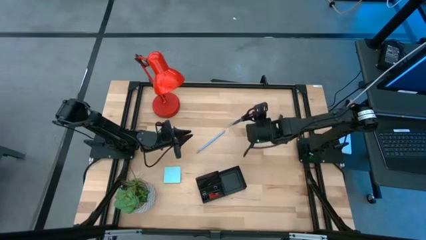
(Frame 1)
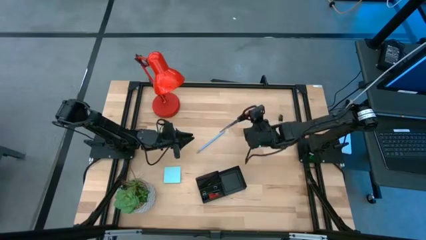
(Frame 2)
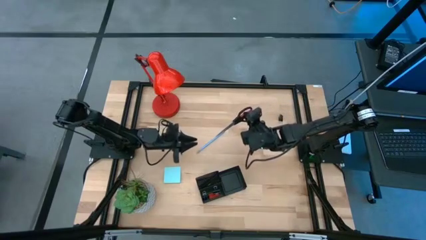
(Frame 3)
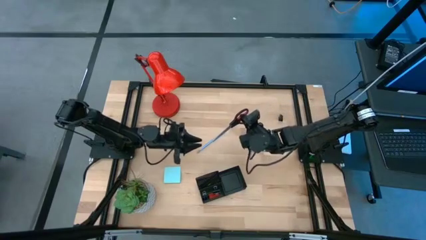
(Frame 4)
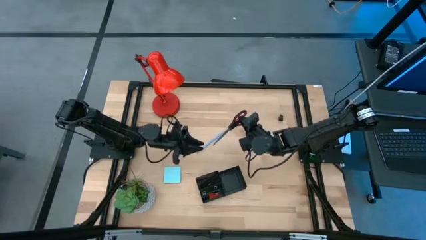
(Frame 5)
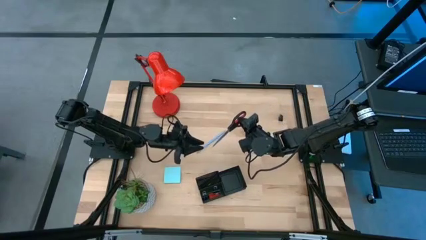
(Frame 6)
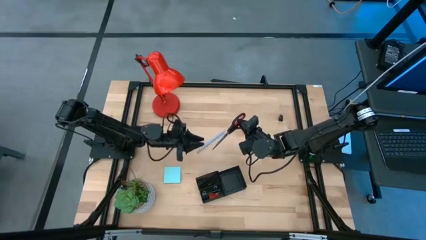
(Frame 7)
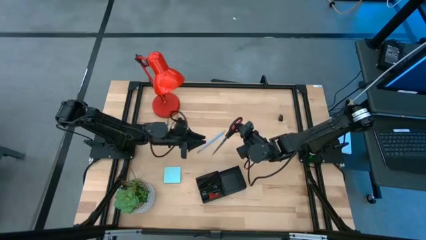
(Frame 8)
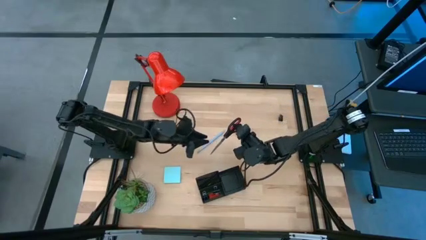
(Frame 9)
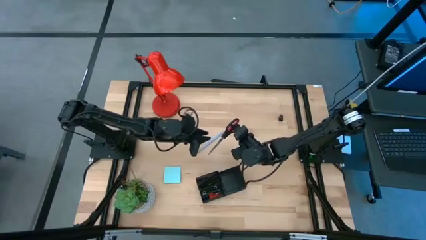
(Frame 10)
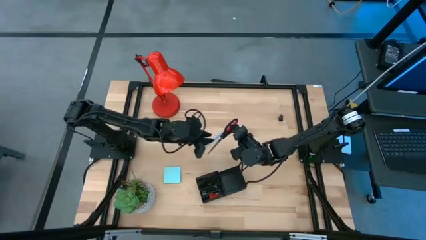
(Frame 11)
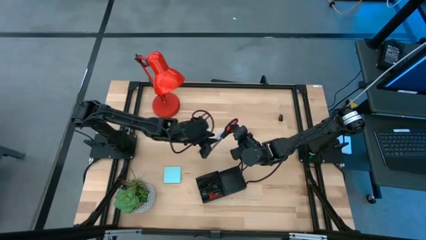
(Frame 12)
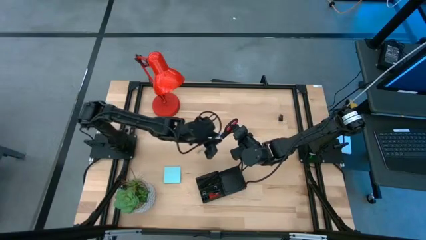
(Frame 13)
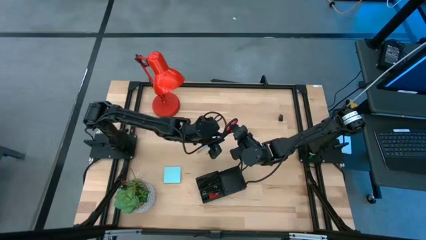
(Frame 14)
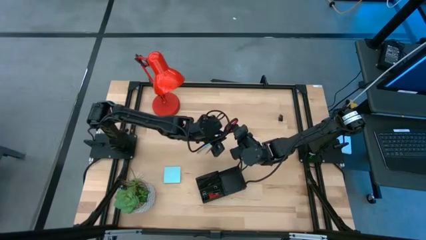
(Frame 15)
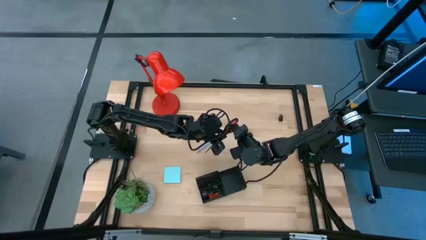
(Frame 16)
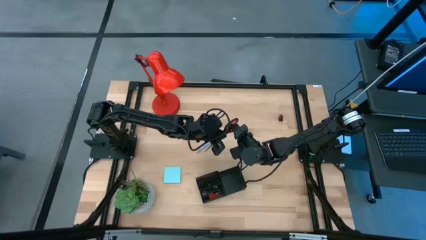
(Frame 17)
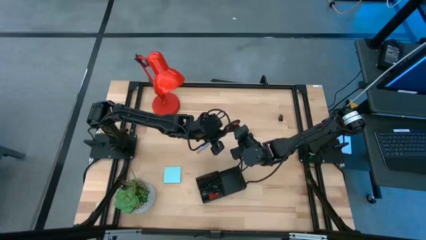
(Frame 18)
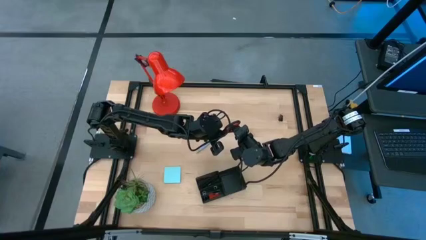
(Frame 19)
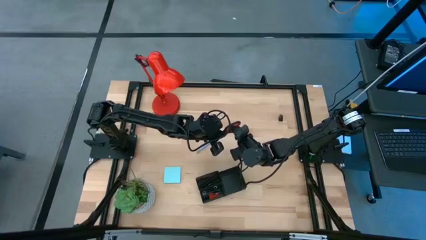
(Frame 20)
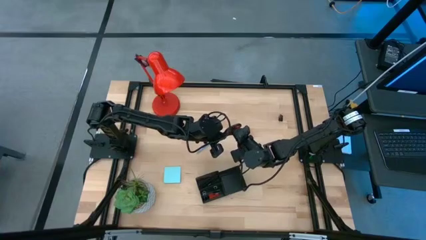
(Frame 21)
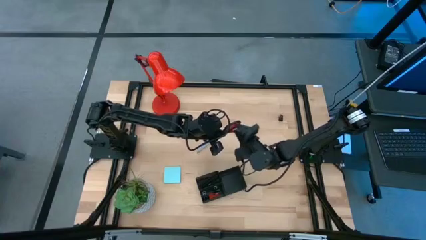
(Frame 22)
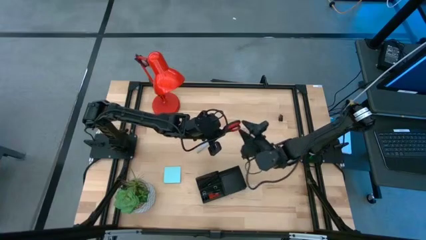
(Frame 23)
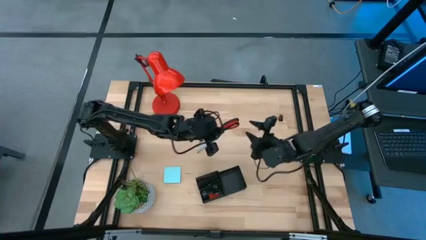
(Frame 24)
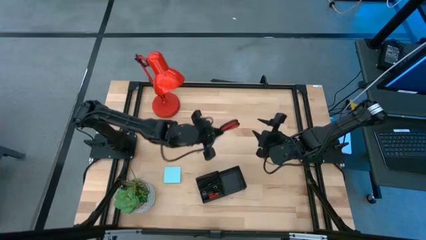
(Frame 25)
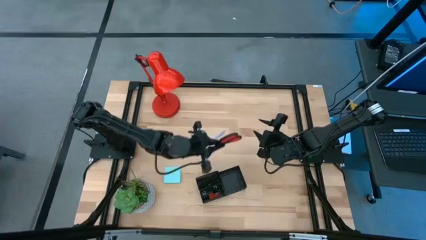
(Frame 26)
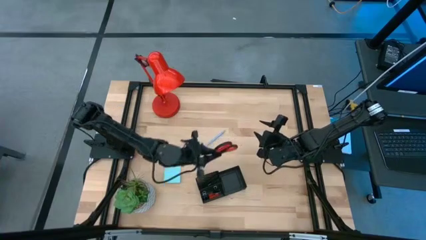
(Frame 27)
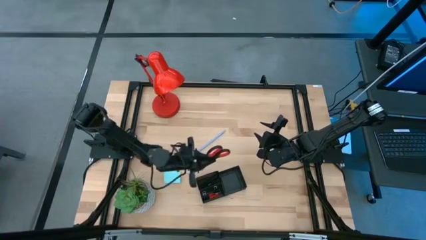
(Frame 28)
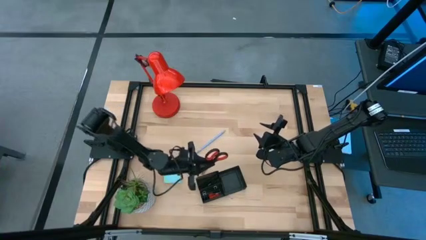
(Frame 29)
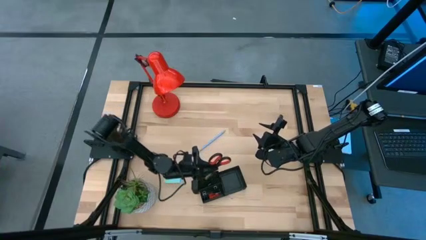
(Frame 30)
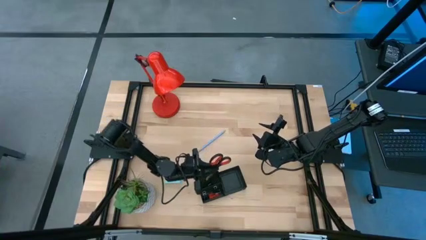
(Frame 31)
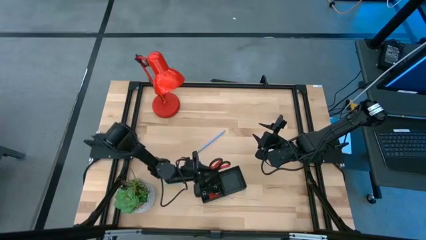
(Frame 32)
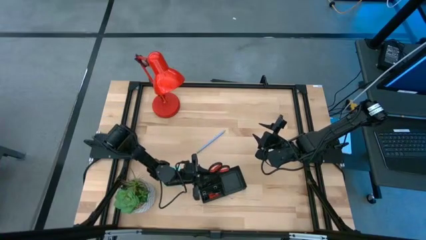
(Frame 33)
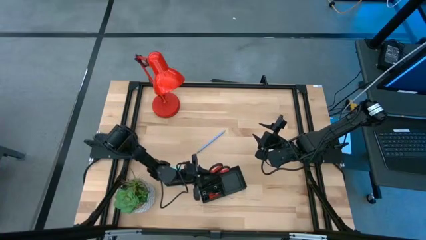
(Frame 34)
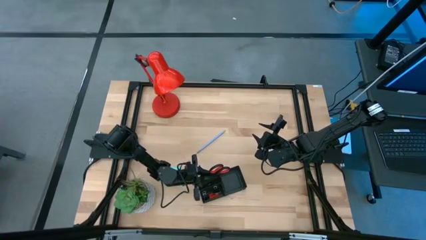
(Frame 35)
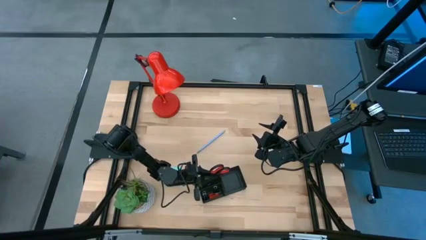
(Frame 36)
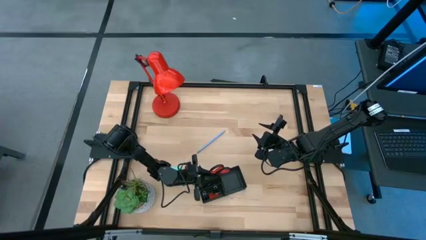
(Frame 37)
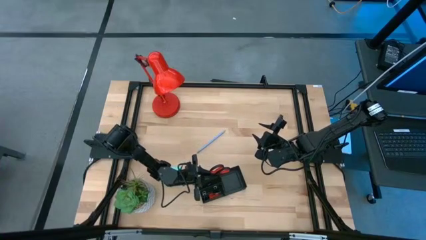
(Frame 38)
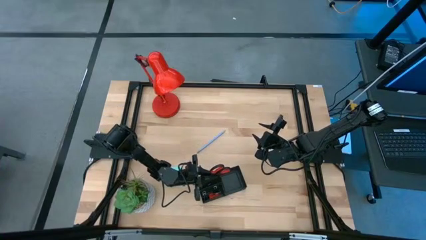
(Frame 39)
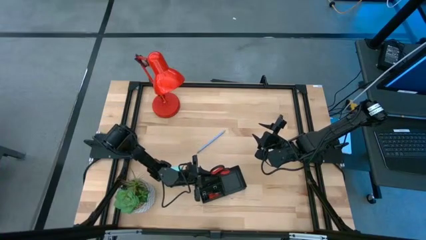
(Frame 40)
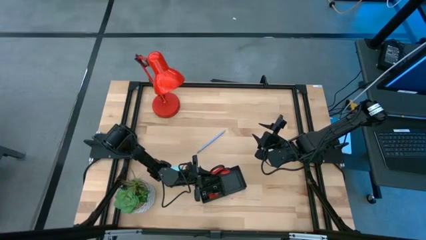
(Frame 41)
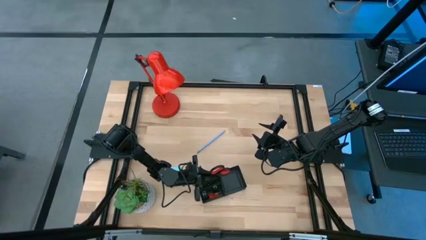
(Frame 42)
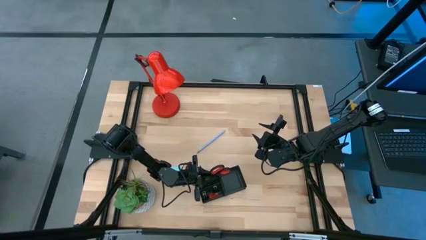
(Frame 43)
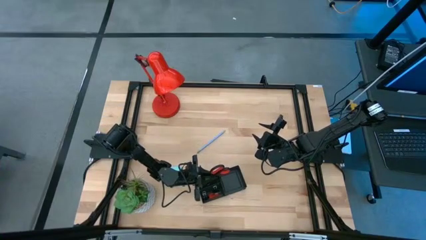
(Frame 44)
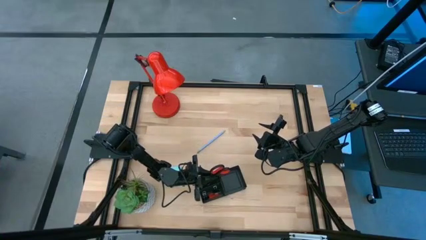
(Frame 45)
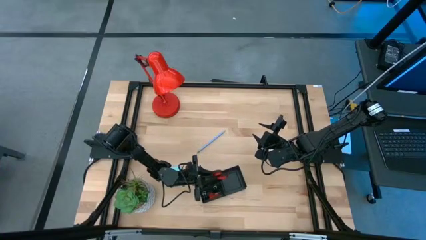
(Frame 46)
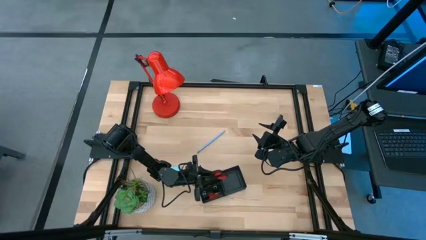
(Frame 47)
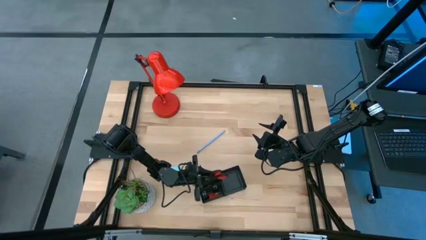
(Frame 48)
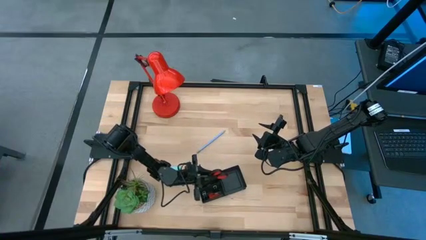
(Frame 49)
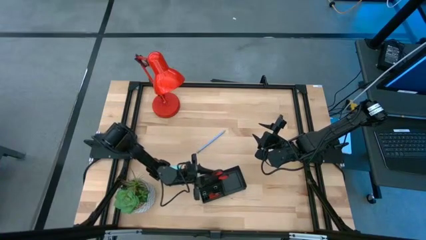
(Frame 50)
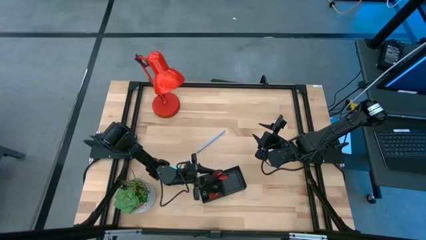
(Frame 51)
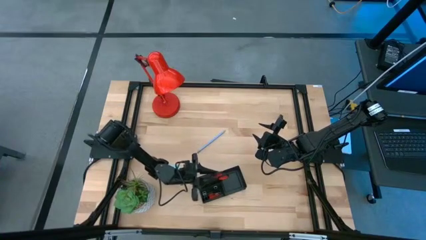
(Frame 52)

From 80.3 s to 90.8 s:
Task: Pick and place office supplies into organizer
Put the black scissors into the black desk organizer

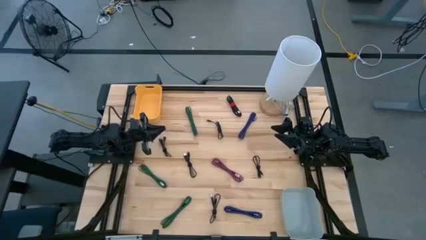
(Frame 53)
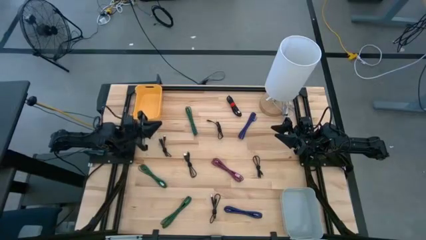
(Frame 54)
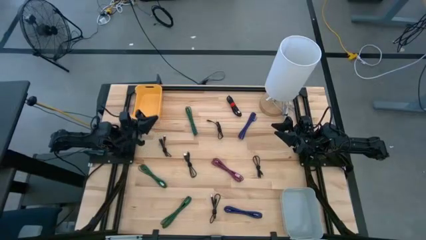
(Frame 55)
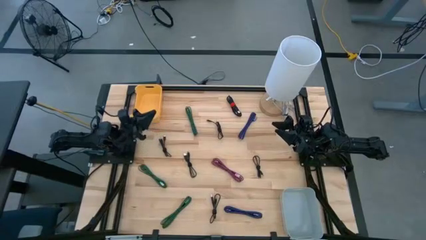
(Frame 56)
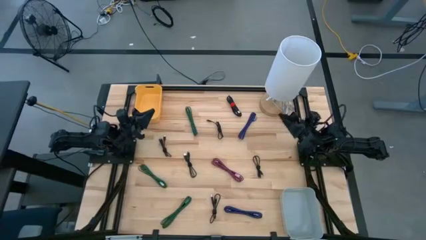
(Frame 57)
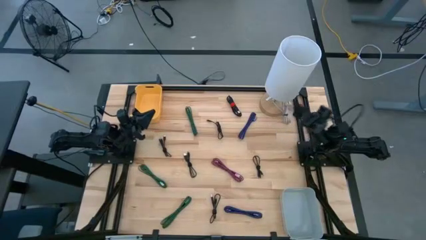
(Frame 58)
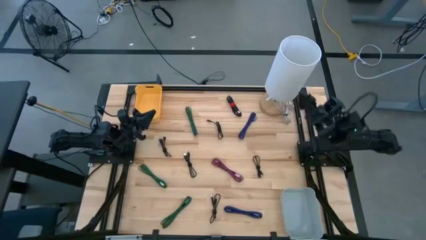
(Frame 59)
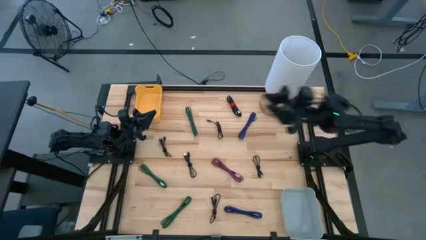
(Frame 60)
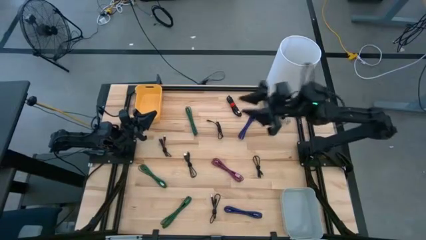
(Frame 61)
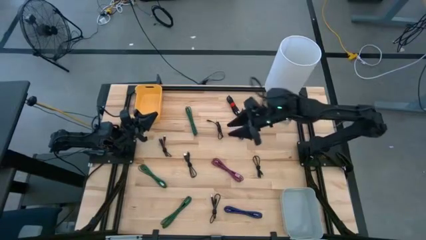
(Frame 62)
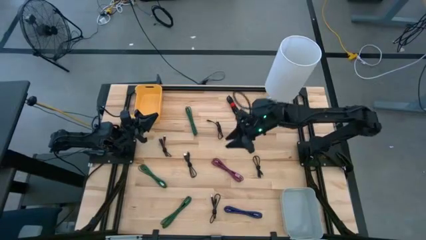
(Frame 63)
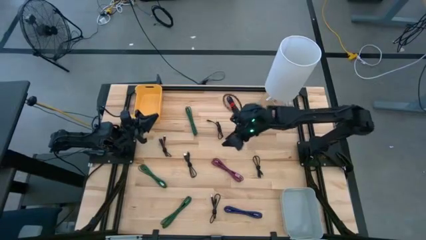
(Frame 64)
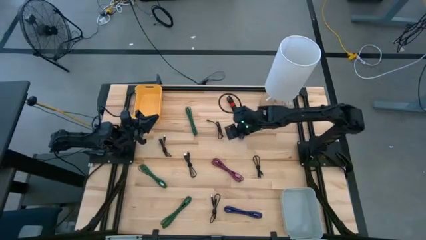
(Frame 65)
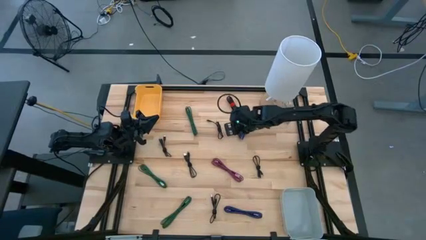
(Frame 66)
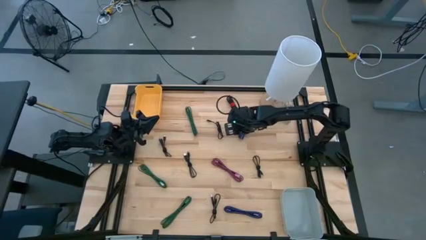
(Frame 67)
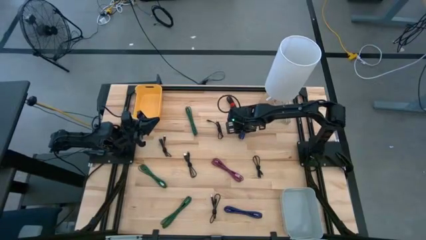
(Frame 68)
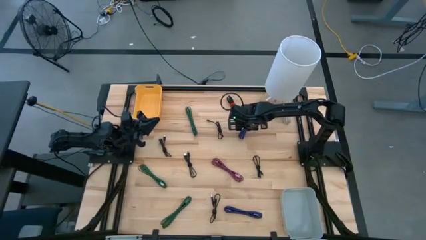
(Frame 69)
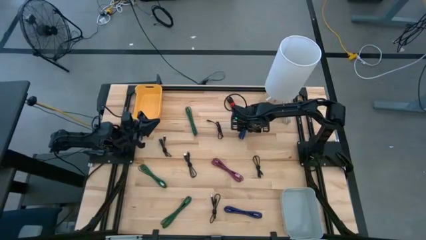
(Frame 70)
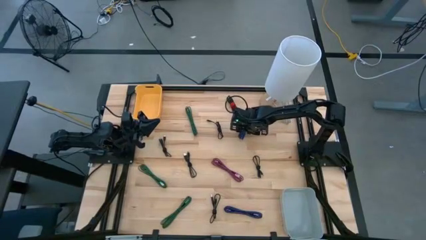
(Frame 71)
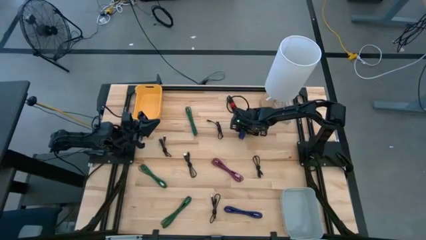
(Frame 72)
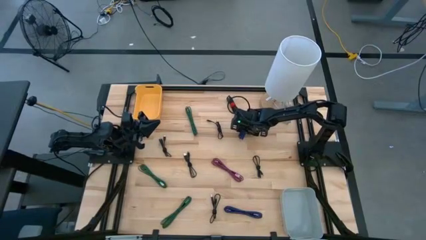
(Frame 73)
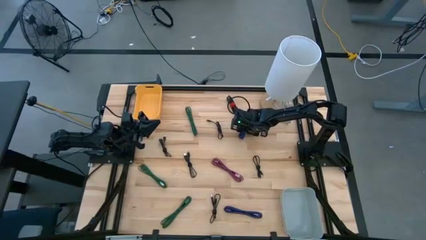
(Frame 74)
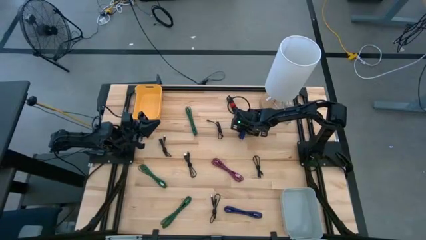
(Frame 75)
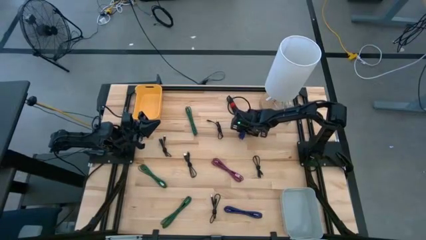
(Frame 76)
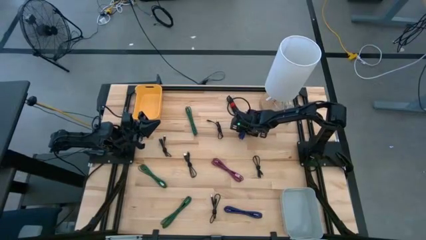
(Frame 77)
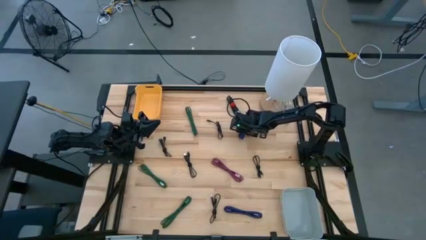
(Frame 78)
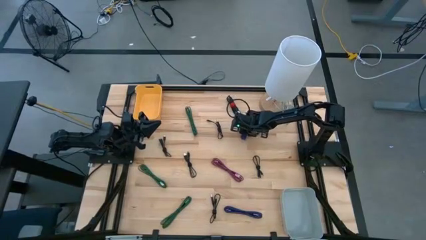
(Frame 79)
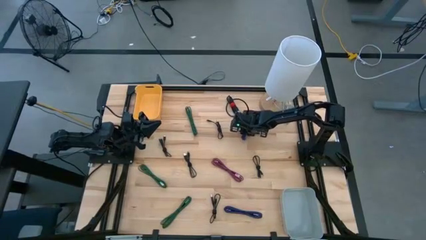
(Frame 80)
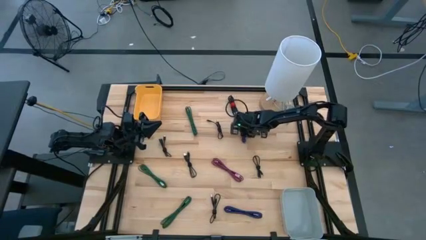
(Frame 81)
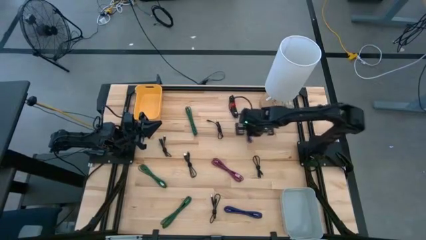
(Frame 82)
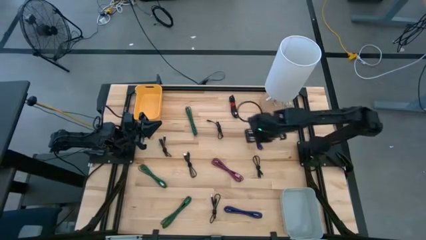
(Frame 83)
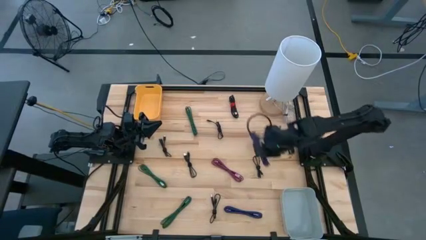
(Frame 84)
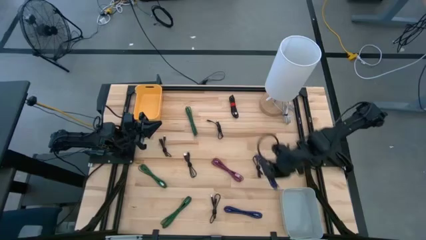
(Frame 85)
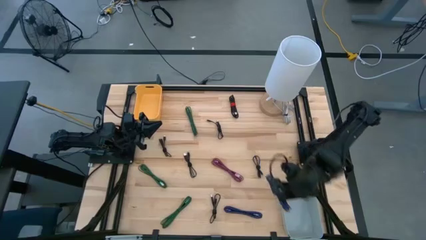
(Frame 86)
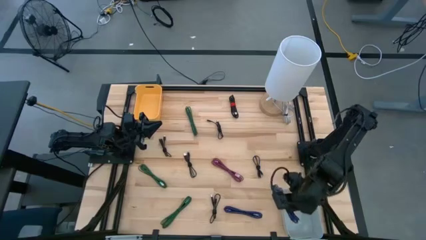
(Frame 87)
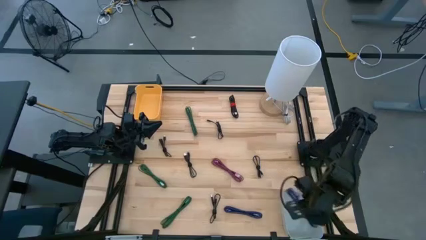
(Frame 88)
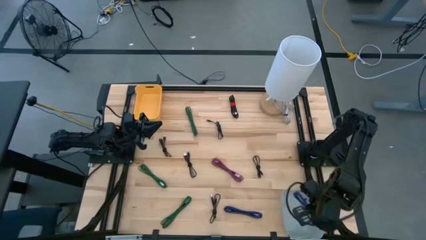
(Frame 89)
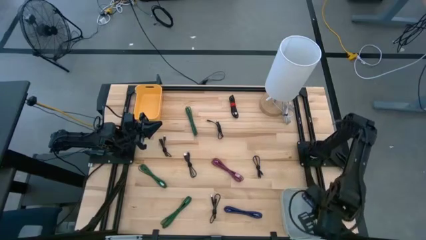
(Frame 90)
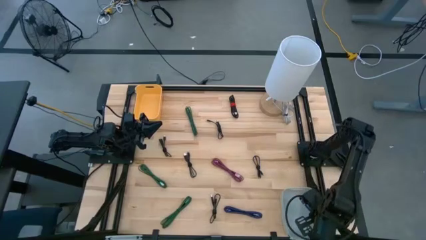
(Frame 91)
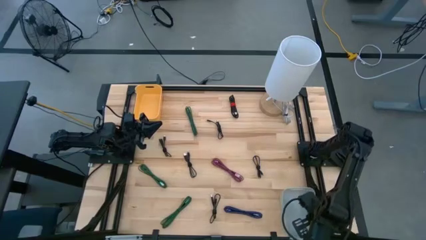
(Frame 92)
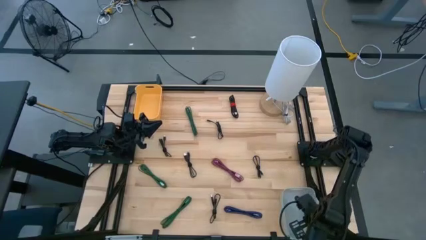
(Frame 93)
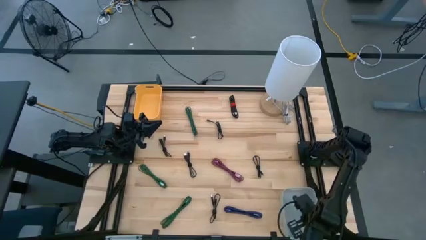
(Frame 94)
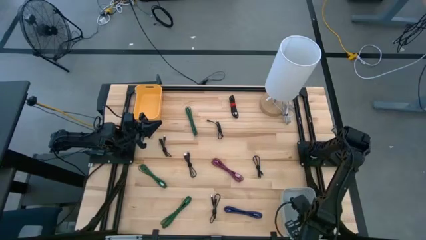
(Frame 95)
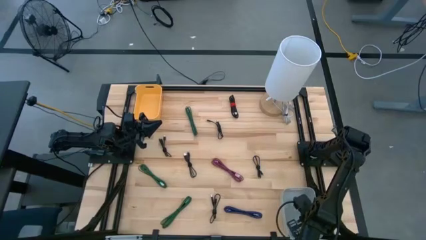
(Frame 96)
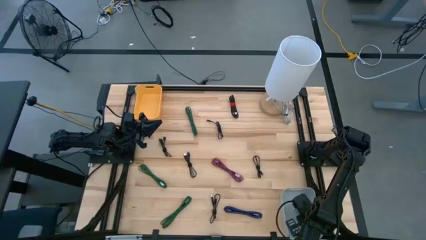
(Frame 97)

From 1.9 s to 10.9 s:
Task: Pick & Place USB Port
Put the violet charger cable into the gray bin
